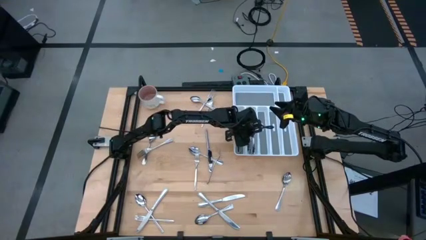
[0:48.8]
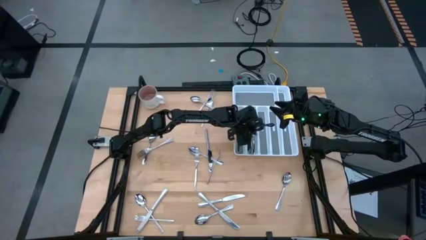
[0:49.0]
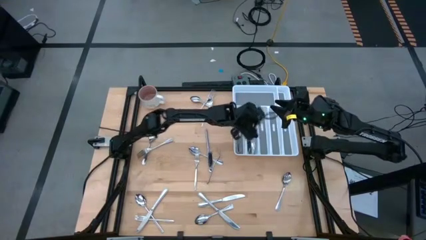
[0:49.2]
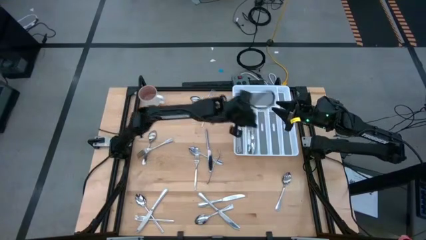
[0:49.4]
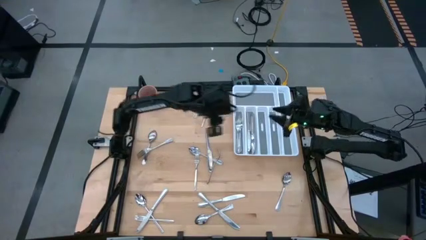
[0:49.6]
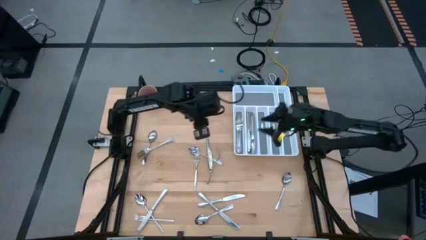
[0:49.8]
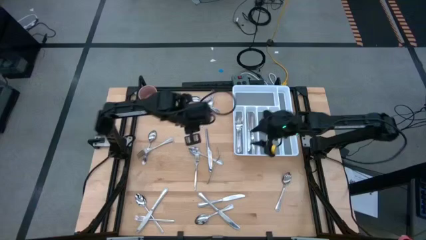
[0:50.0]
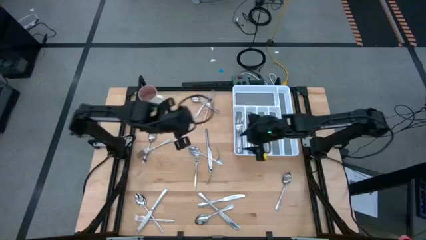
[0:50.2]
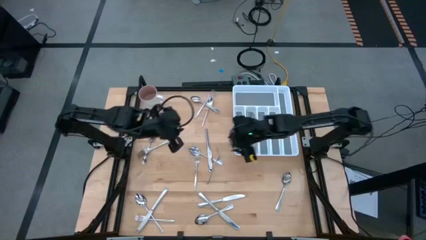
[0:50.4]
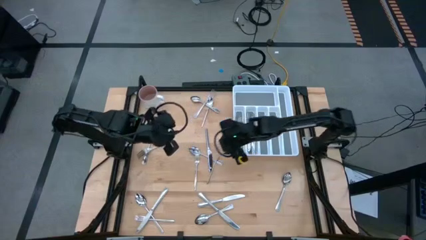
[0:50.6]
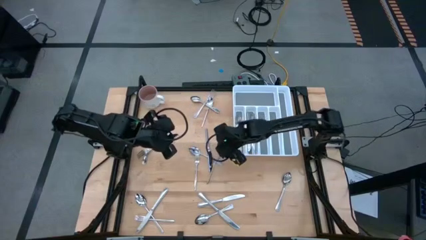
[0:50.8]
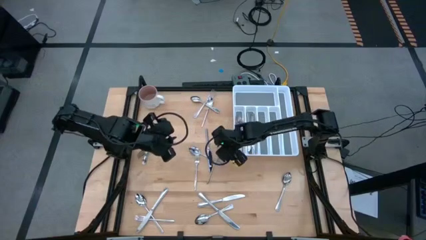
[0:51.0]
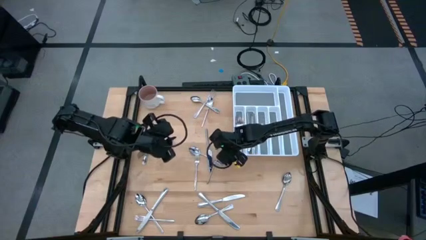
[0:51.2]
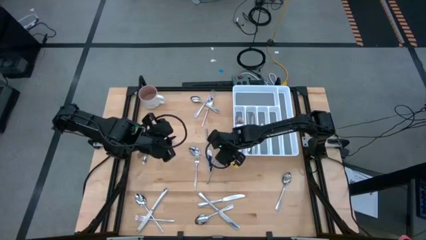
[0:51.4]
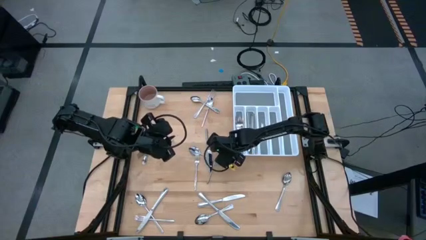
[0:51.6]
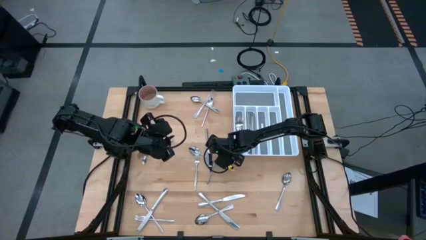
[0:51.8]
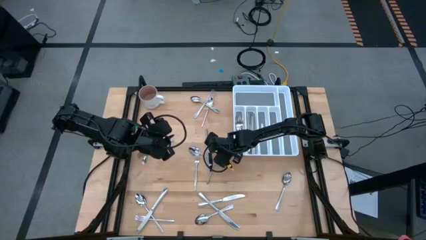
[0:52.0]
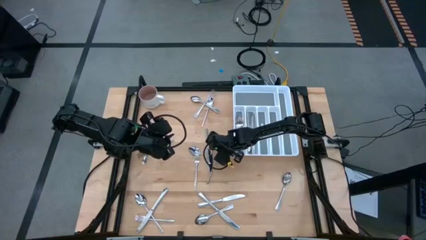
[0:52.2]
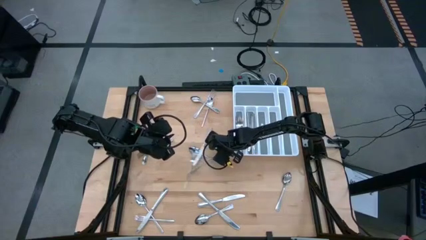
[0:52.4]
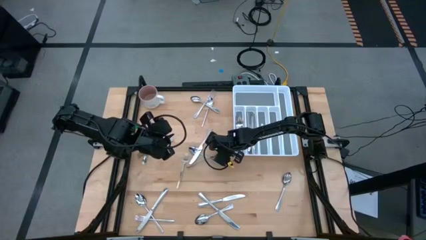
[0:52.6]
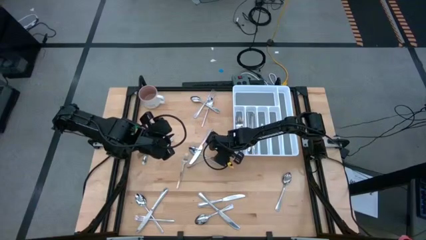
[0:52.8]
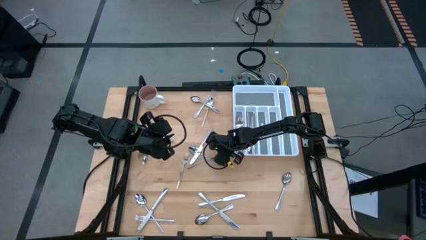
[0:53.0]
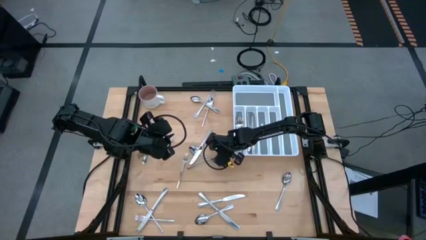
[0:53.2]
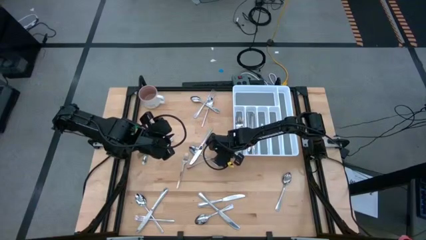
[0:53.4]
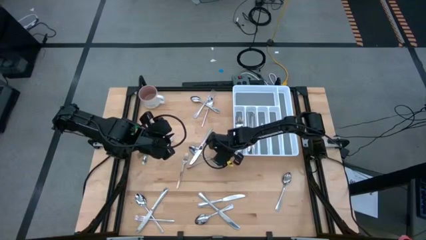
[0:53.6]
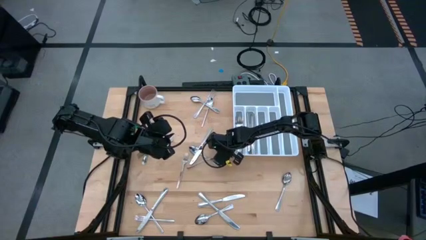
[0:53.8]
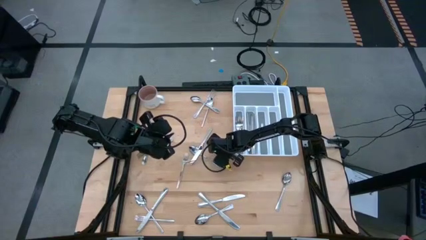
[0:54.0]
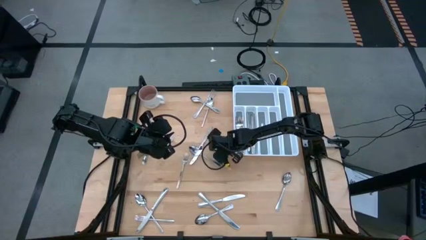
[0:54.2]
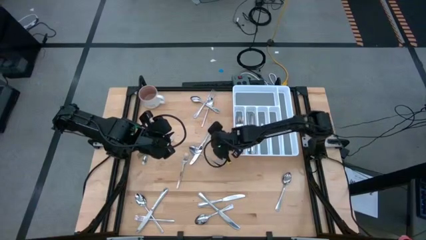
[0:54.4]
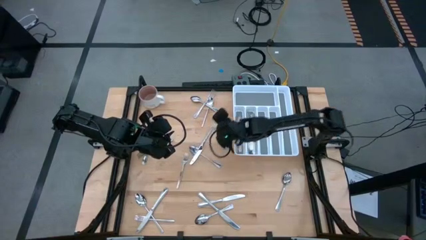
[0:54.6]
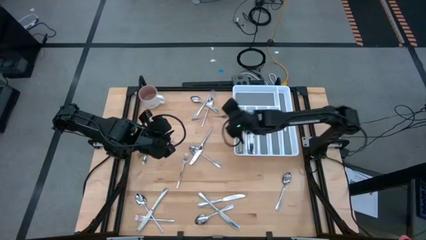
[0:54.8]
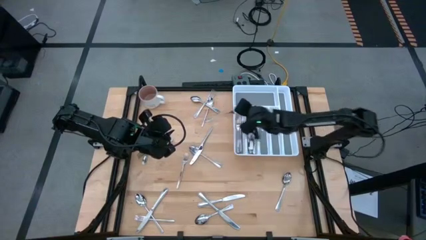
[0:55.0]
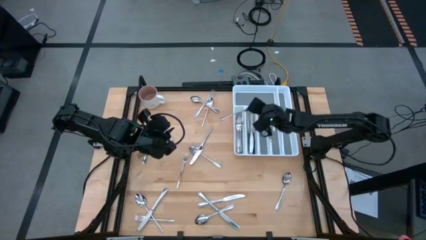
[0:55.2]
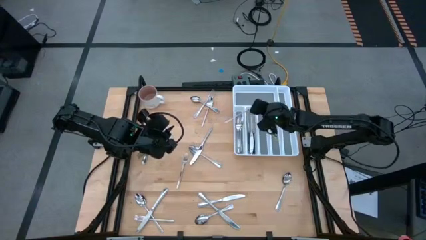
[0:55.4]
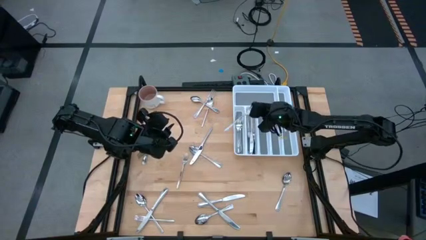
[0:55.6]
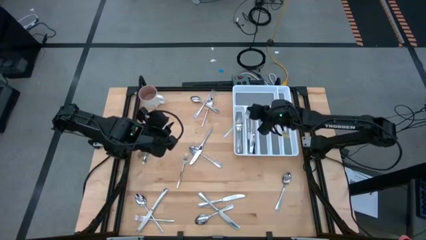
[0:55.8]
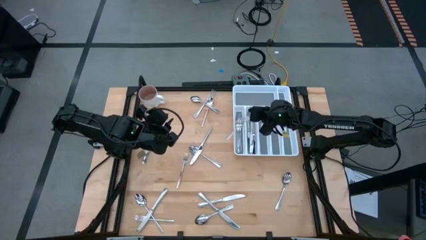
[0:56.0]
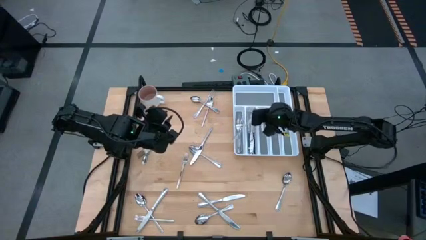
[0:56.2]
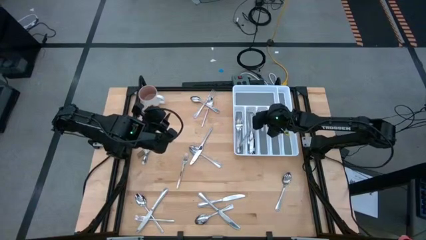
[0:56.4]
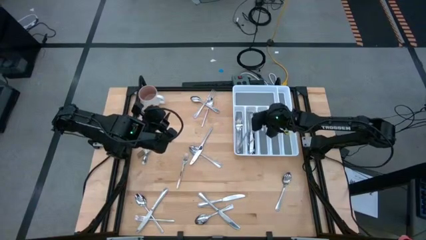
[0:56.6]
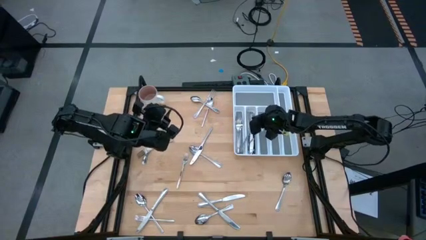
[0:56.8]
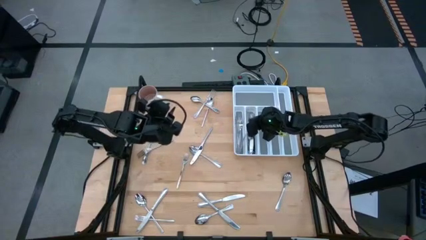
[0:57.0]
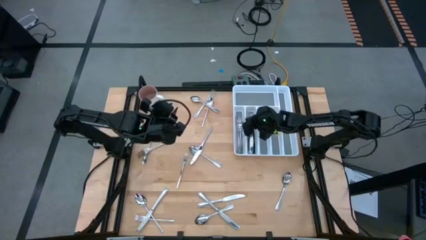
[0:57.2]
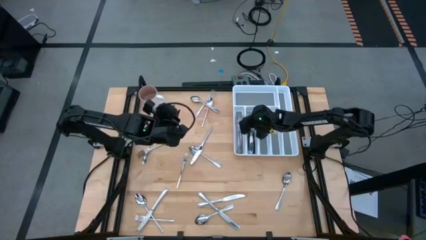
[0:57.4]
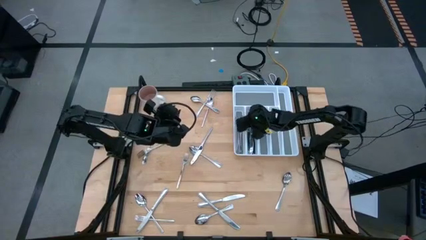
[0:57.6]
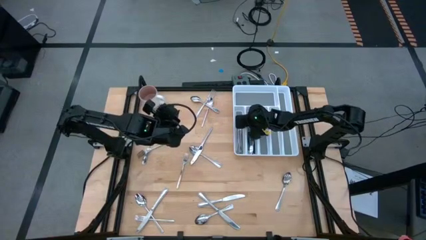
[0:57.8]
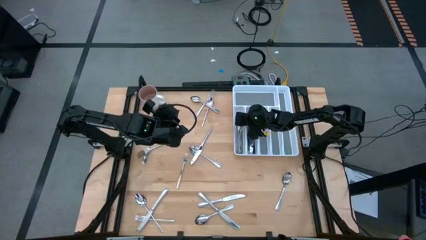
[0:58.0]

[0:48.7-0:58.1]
Task: Sort silverware
Put the silver knife into the left slot of the white silverware tray

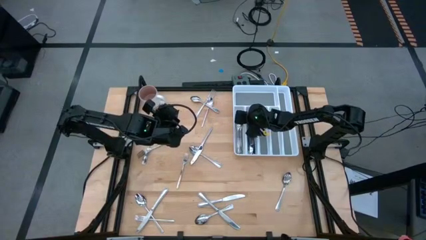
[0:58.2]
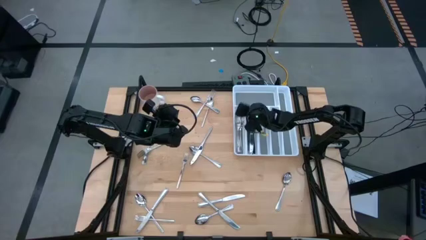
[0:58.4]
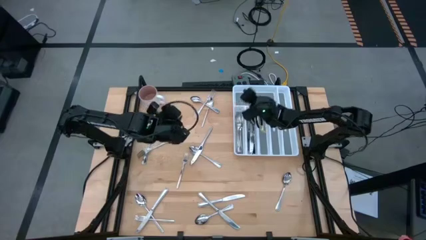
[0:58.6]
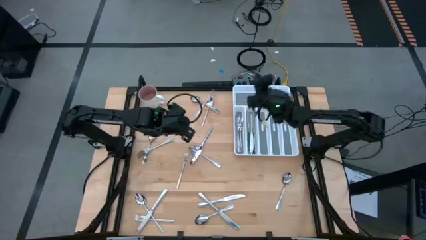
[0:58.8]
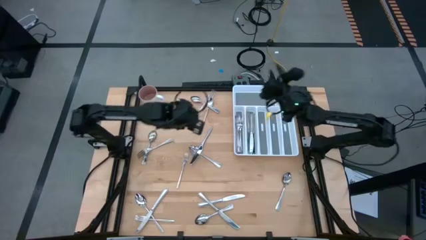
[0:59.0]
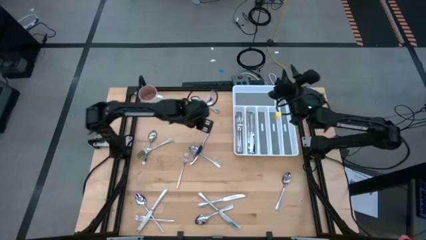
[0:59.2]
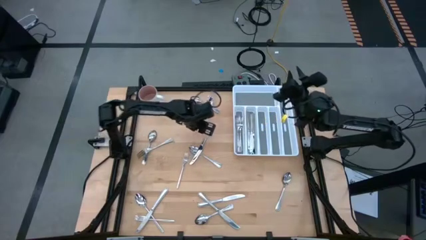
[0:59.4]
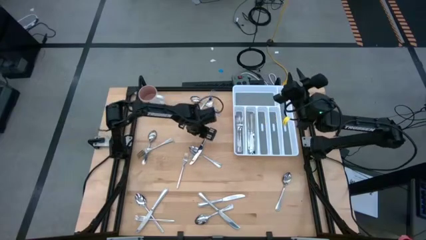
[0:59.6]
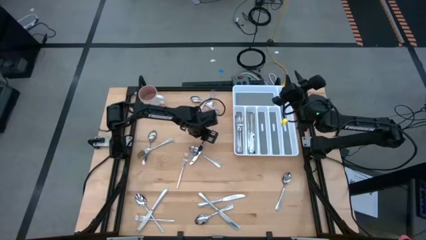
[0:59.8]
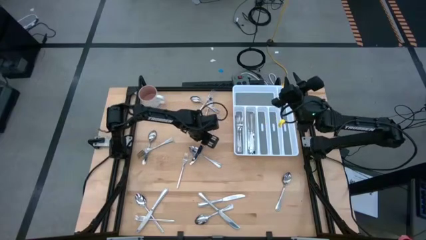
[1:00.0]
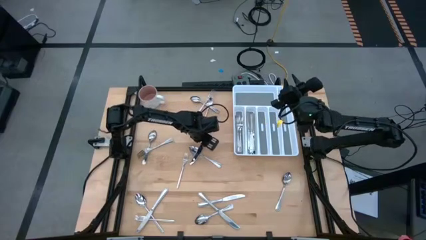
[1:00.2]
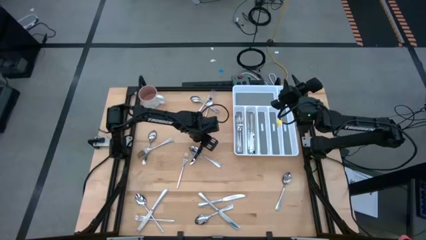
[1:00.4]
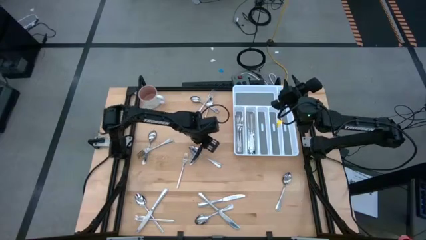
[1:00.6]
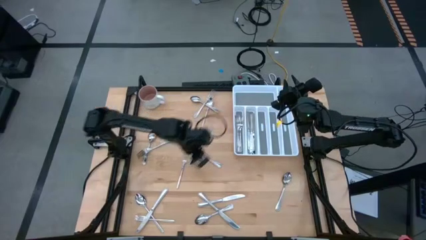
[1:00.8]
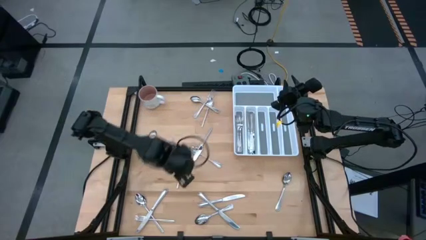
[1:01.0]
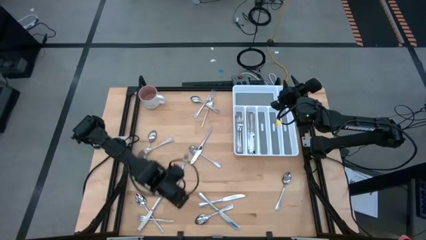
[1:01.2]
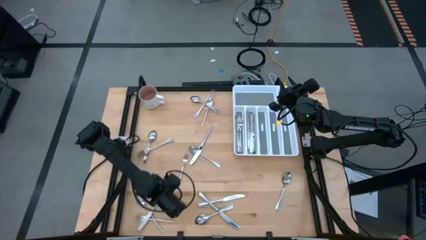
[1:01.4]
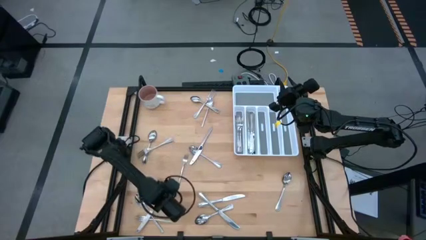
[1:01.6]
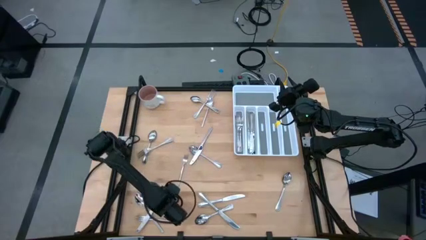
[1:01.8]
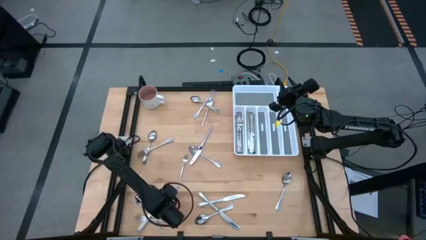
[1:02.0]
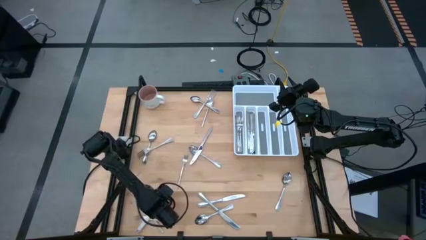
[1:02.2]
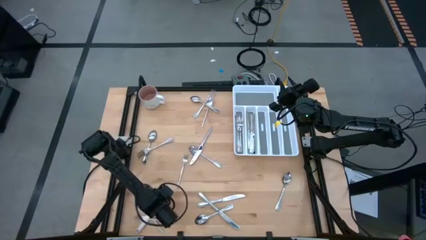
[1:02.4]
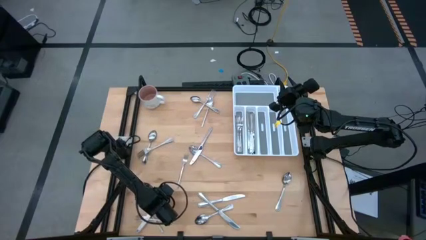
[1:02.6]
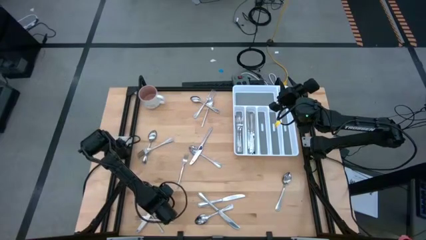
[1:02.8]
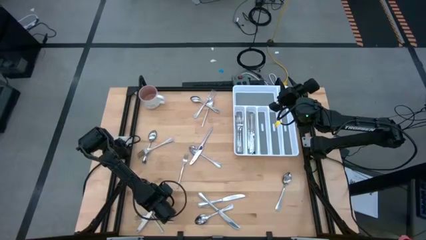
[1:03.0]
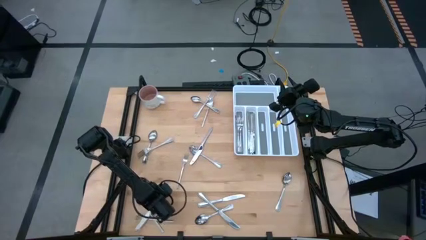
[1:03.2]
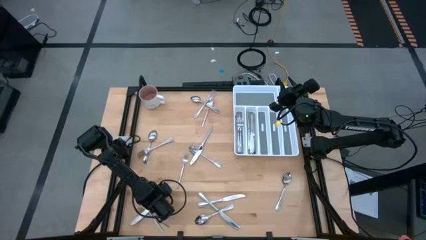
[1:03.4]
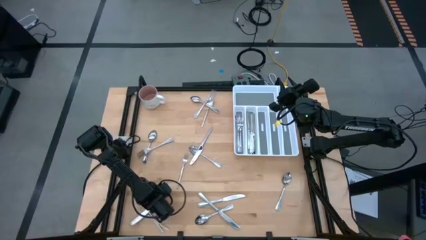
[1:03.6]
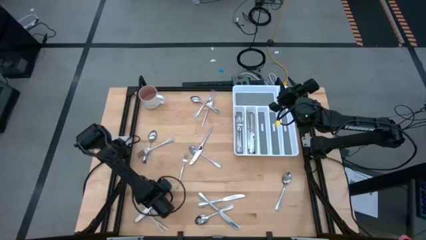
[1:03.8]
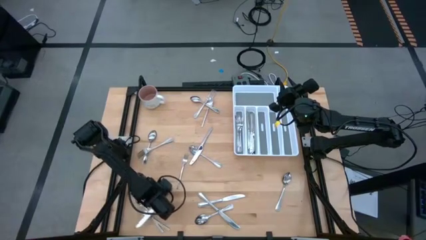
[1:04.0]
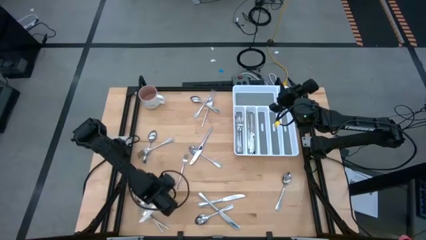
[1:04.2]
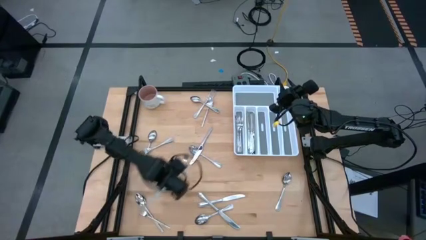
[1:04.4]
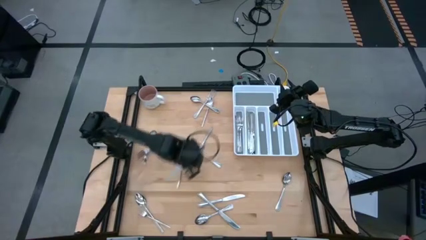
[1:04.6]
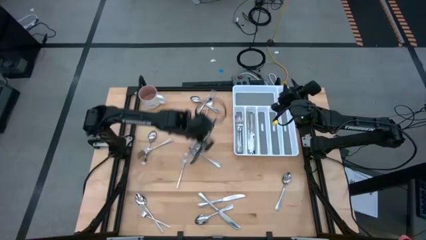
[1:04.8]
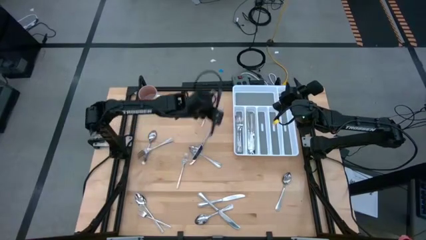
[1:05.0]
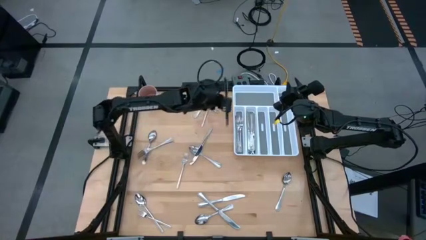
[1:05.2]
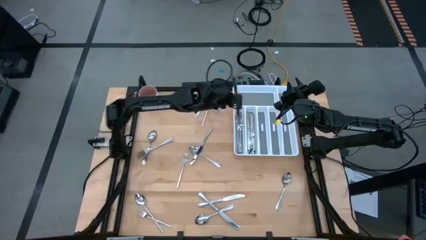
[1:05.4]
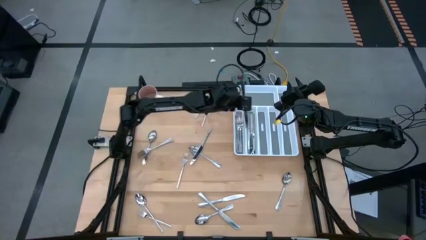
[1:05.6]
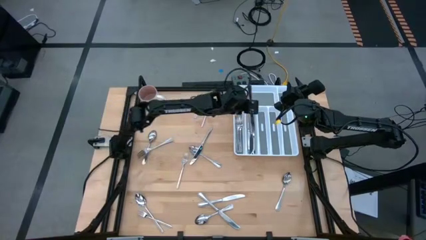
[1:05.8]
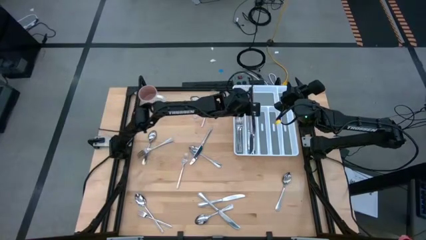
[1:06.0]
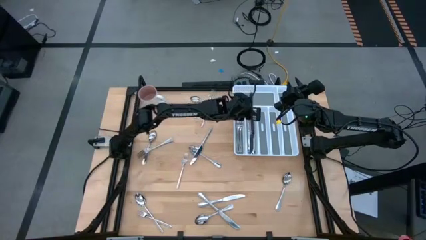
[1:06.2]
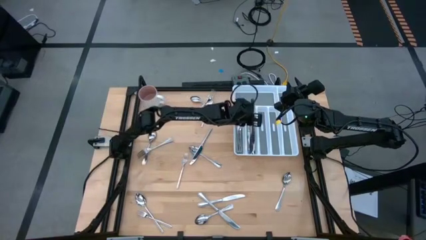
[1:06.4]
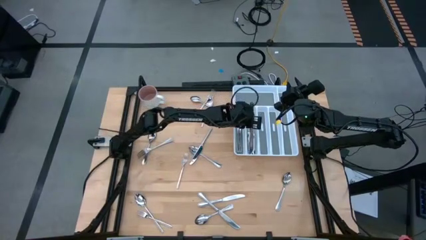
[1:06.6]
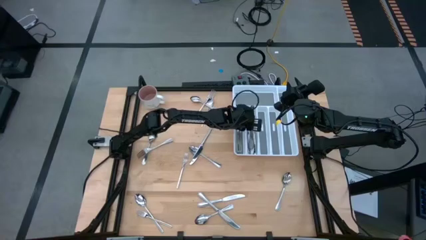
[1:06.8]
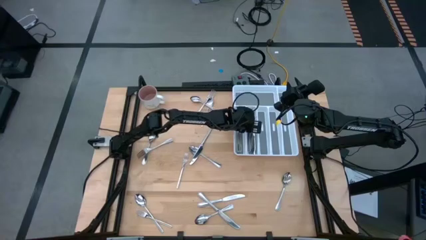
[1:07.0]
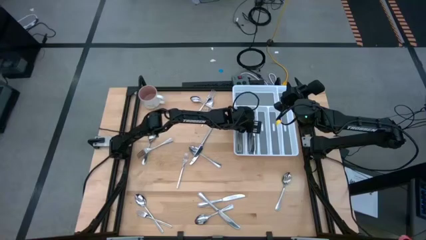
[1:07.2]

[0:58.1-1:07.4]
Put the silver knife into the left slot of the white silverware tray
